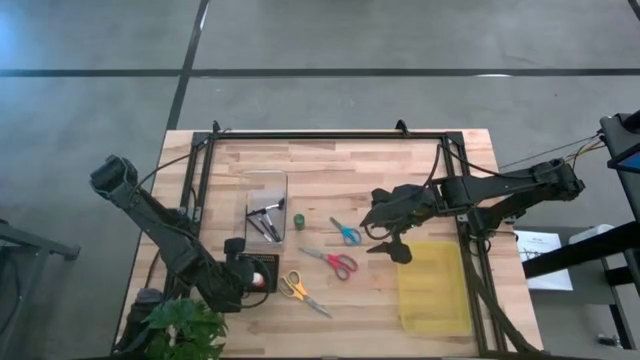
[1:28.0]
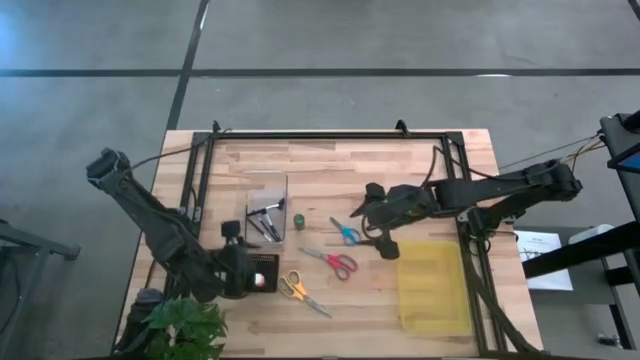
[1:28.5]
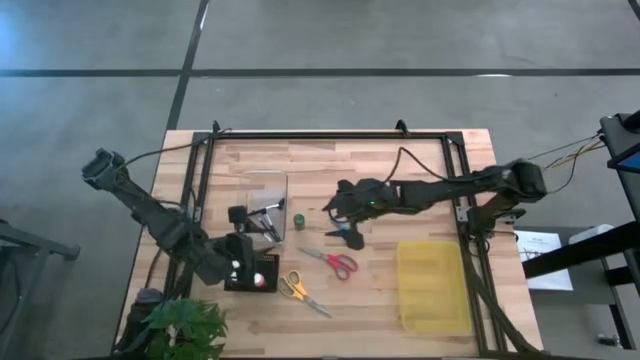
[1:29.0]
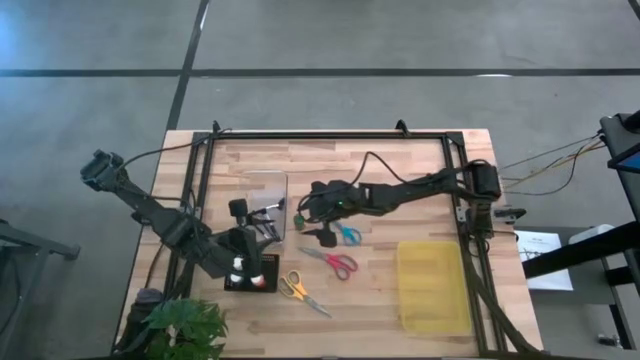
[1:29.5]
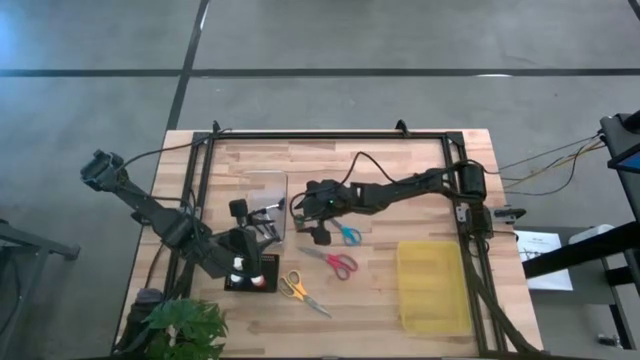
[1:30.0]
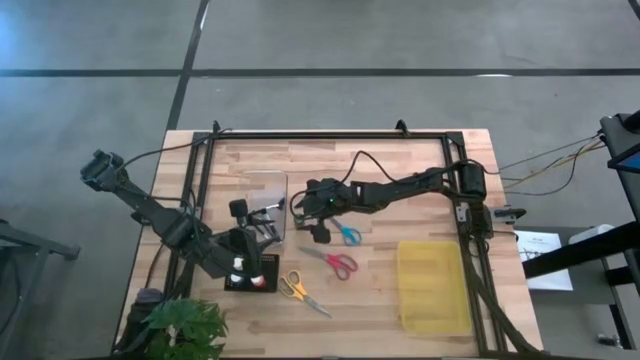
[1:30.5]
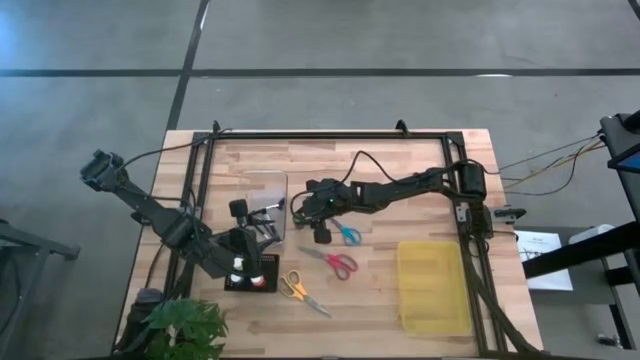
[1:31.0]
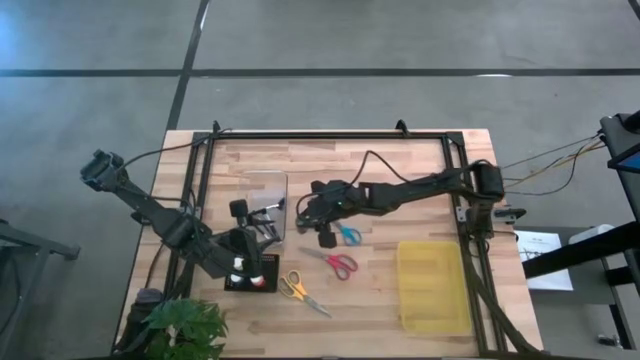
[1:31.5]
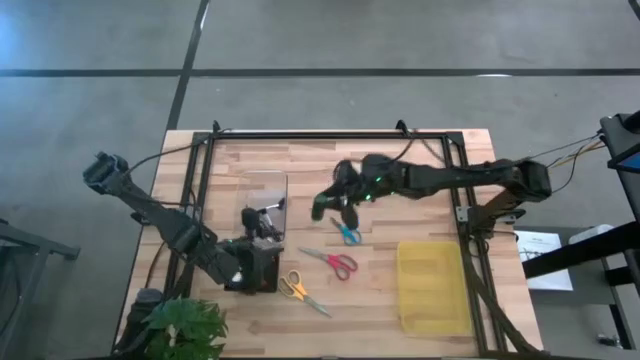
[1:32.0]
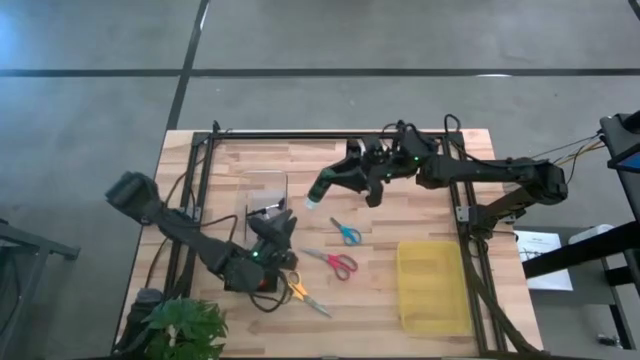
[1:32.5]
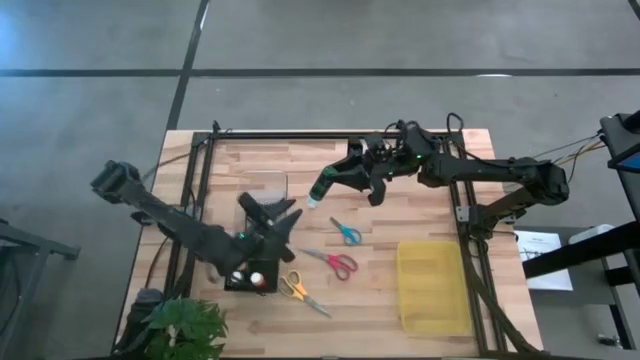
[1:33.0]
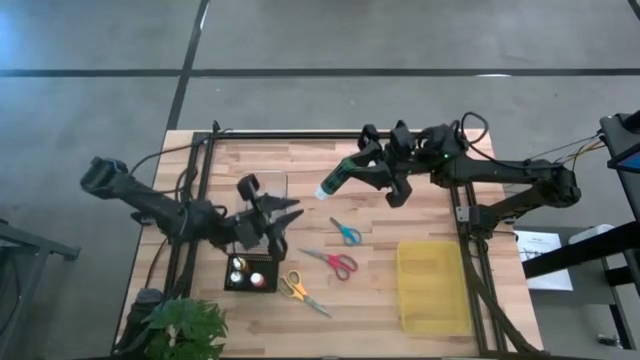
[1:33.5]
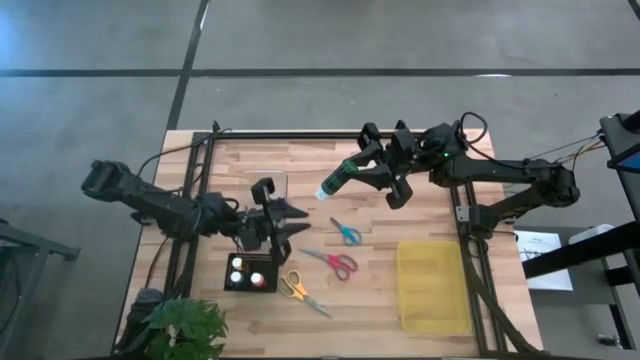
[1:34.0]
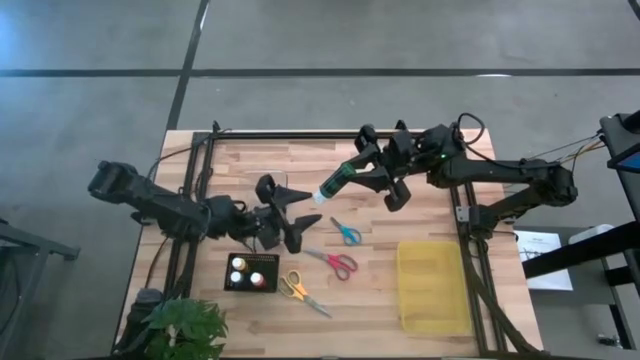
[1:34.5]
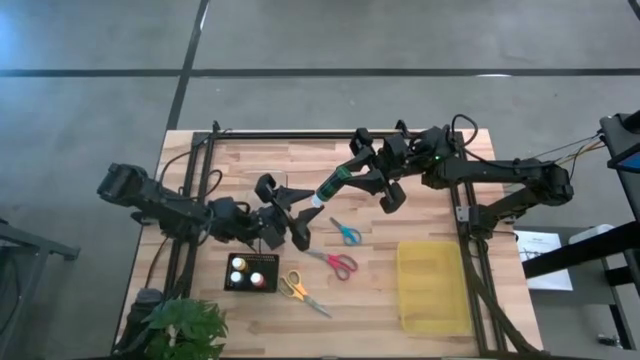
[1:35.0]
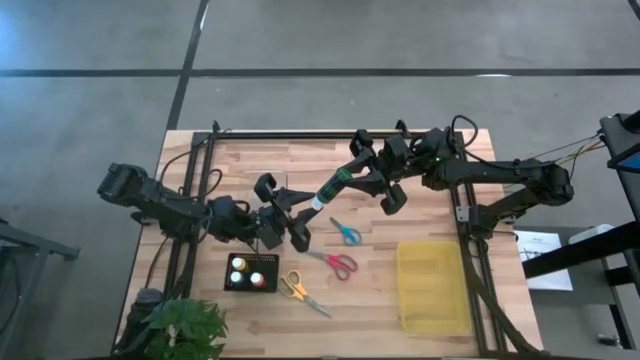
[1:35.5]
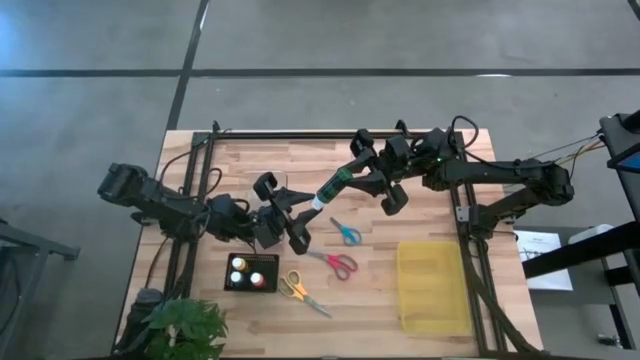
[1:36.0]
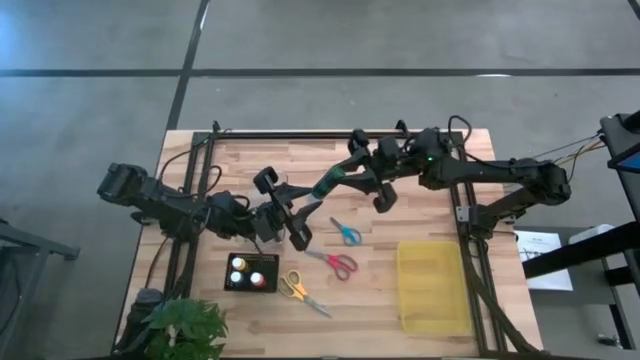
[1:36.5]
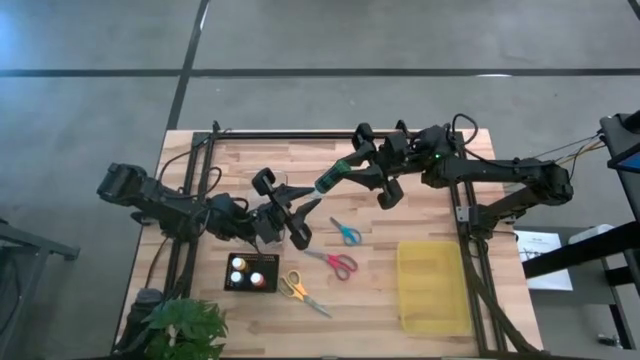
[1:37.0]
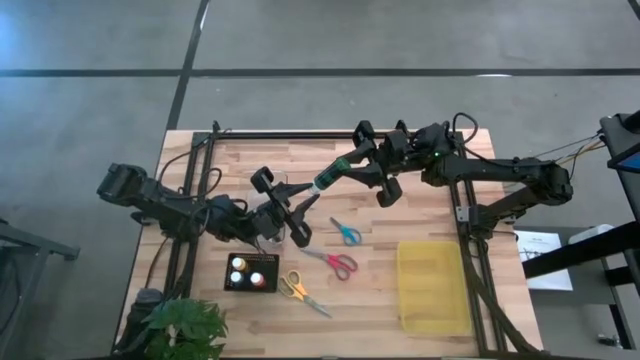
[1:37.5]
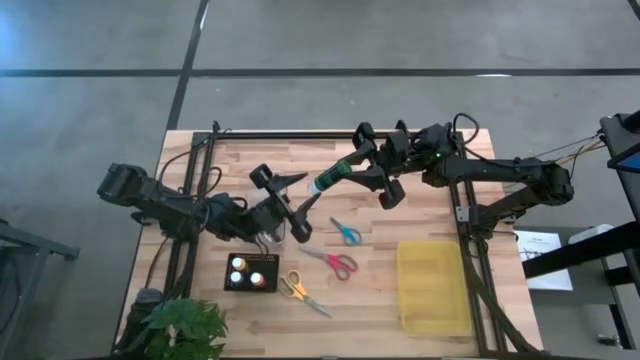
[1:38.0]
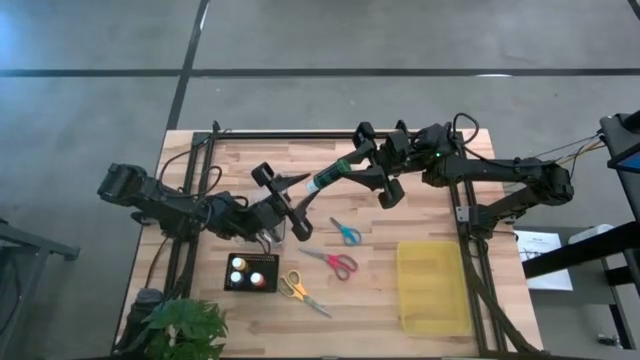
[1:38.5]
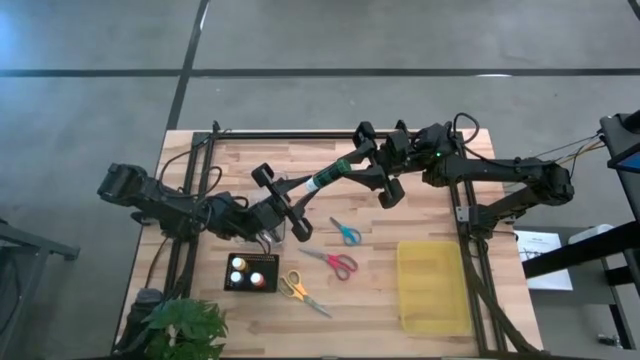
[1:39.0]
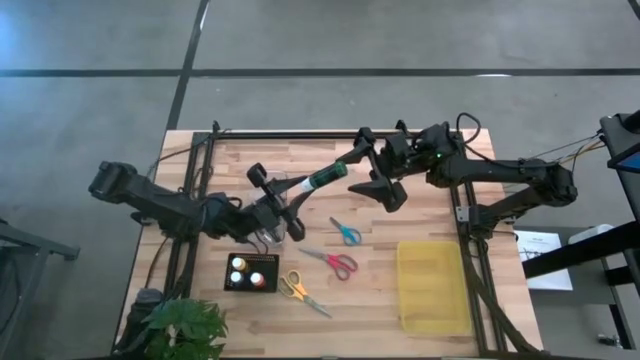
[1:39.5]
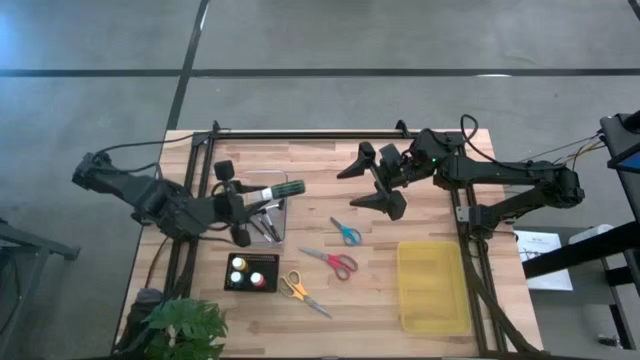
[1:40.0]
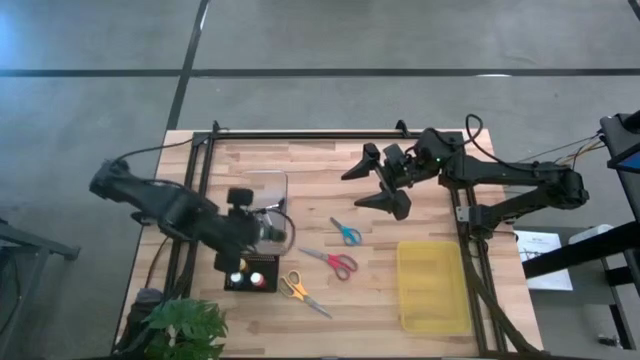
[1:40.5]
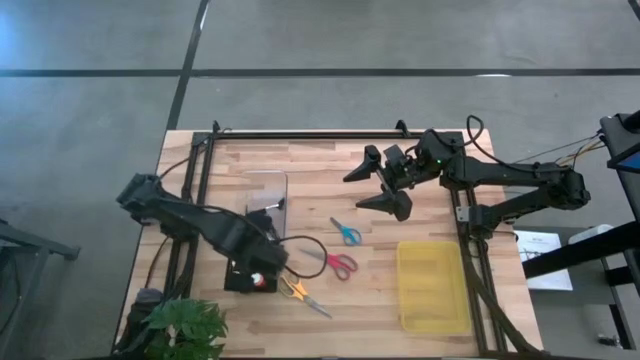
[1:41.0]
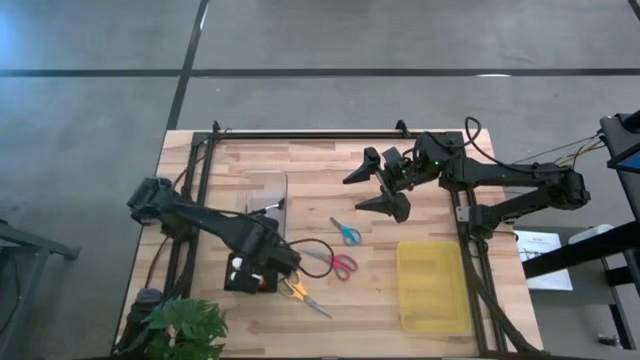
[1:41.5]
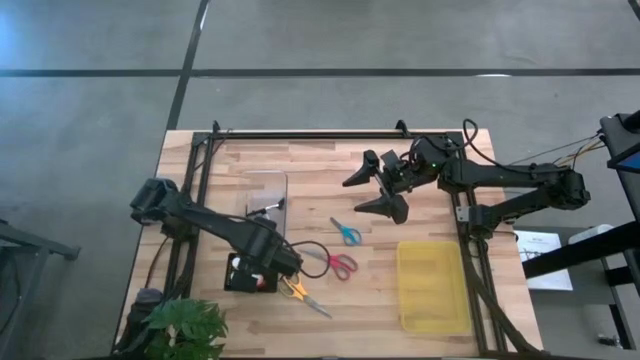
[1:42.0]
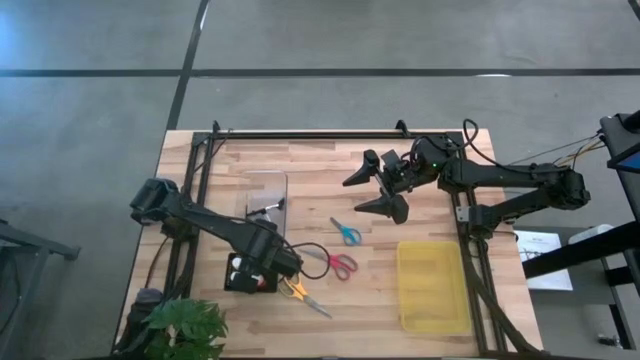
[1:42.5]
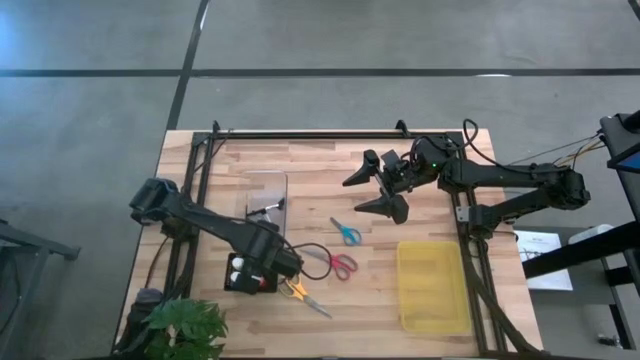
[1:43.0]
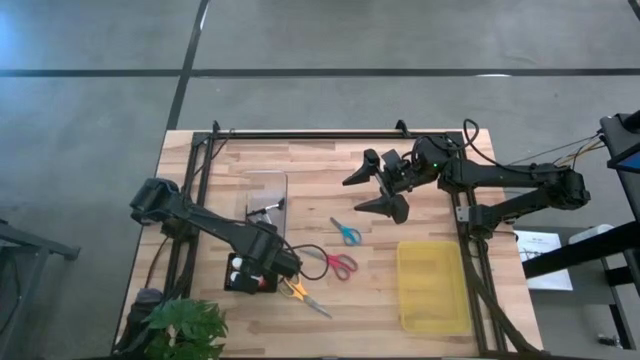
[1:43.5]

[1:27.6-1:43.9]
Task: Pick & Place Paint Supplies
Put the green paint bottle into the black basket

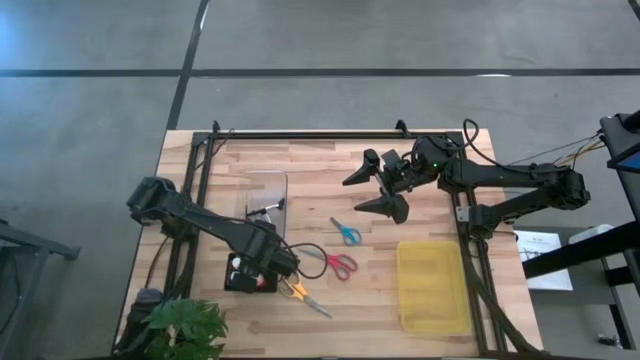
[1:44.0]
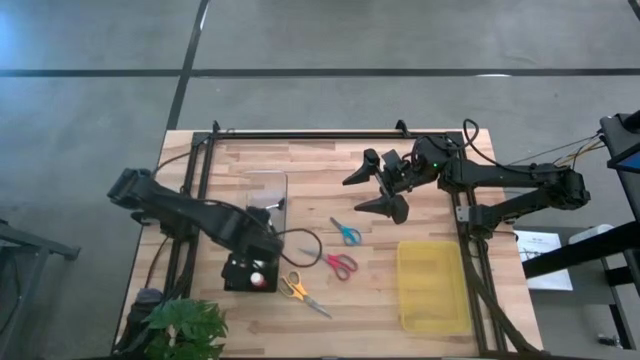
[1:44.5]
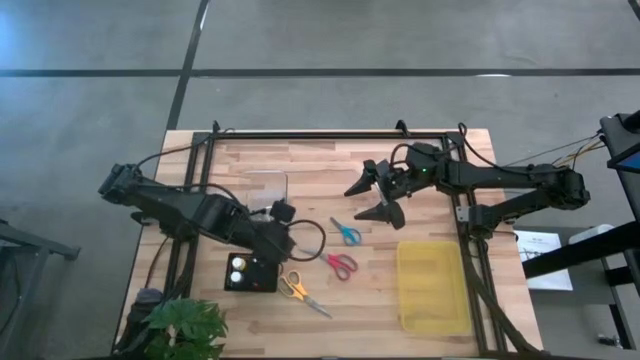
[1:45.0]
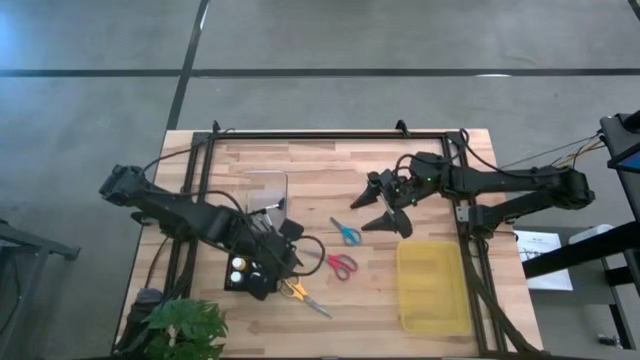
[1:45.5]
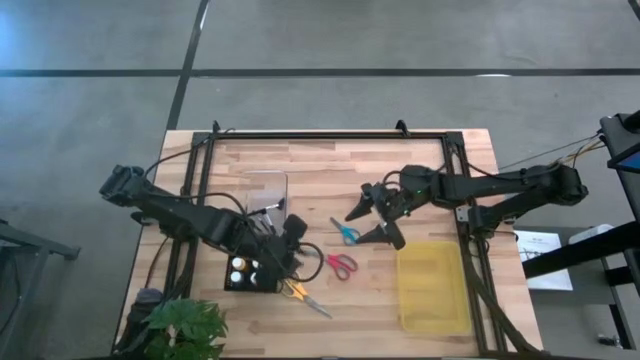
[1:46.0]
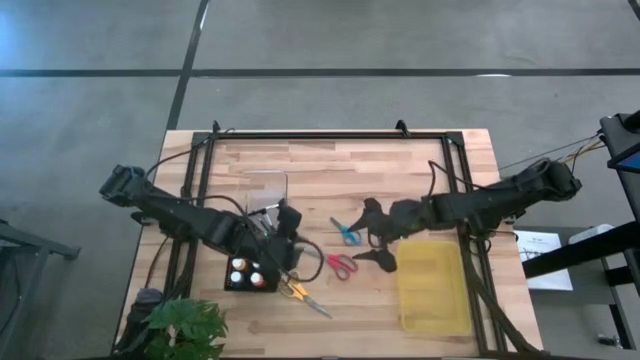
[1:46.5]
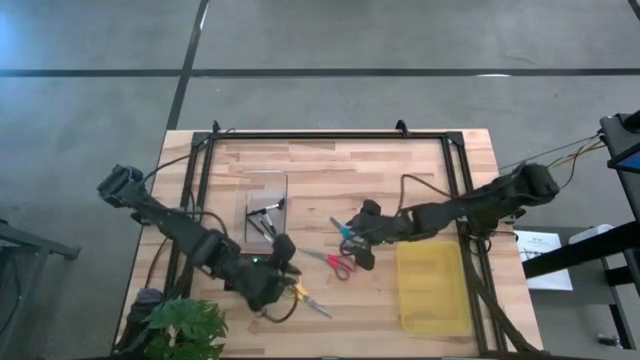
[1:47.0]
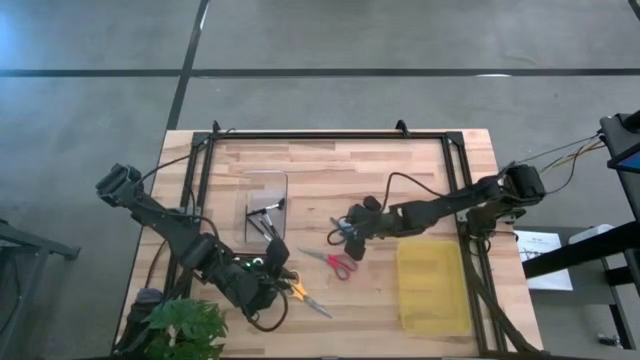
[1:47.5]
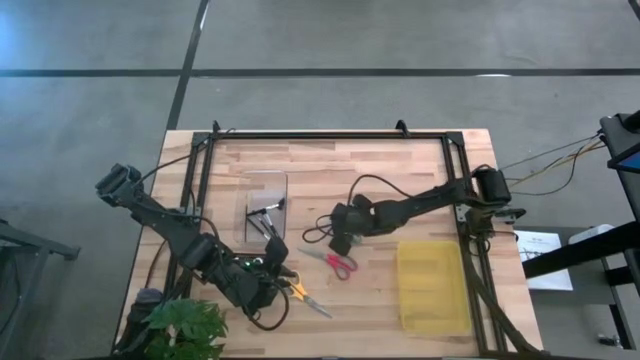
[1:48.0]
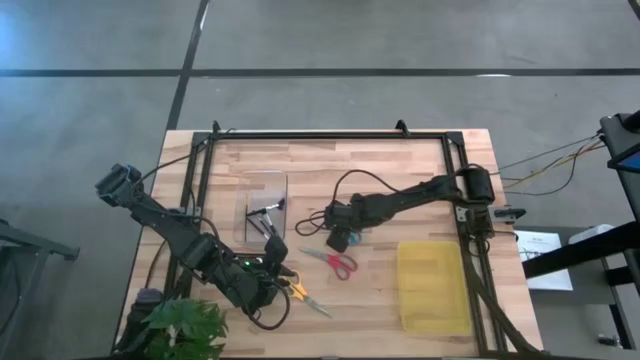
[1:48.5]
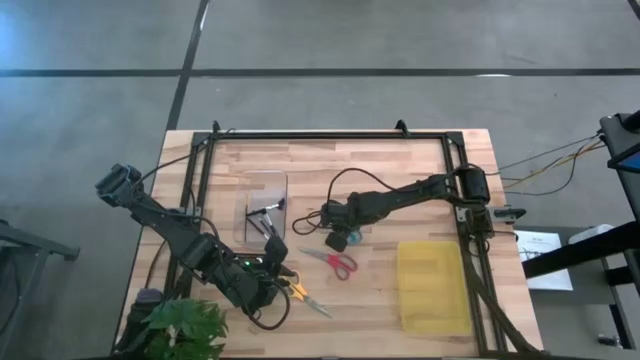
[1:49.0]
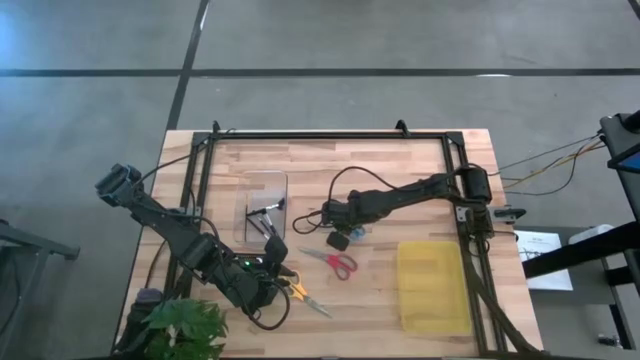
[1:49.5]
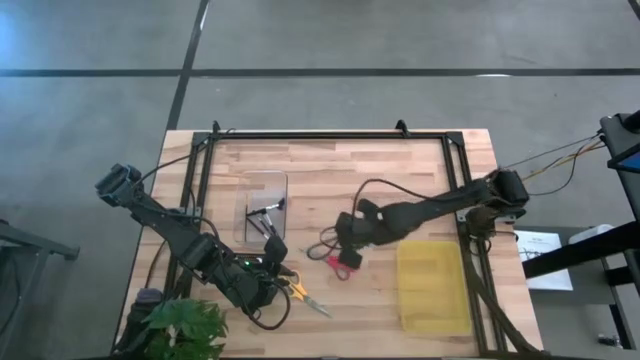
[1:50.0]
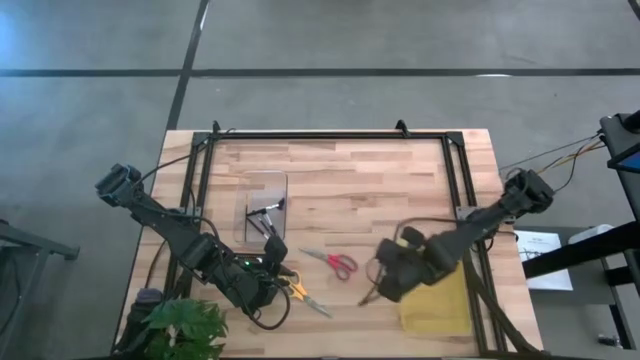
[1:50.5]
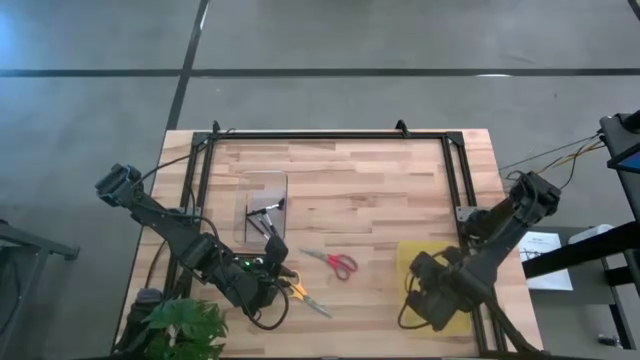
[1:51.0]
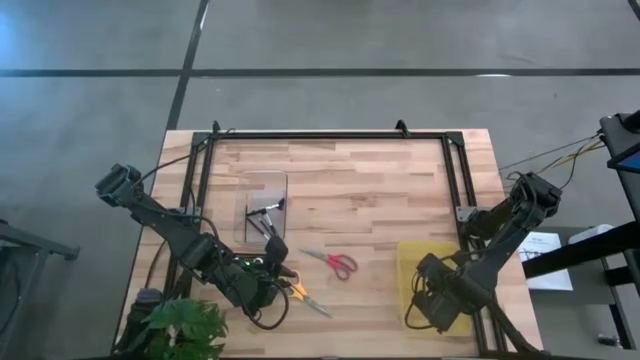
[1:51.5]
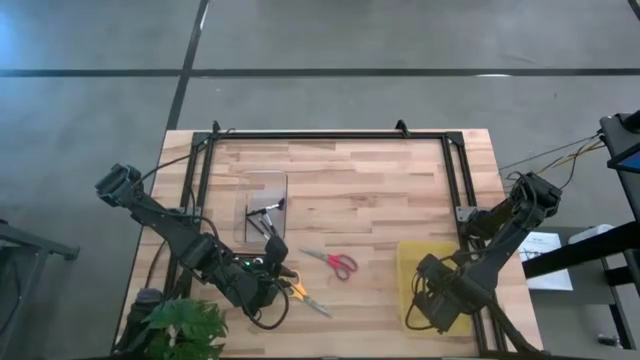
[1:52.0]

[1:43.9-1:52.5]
Put the blue scissors into the yellow bin
